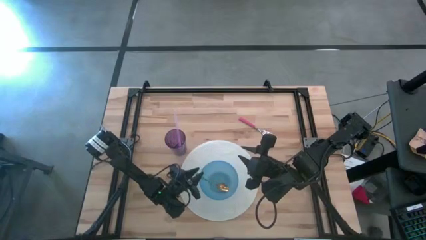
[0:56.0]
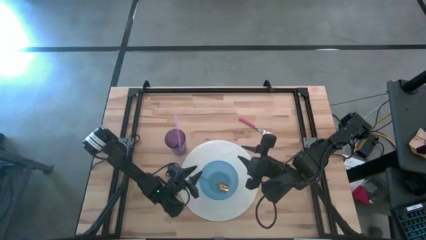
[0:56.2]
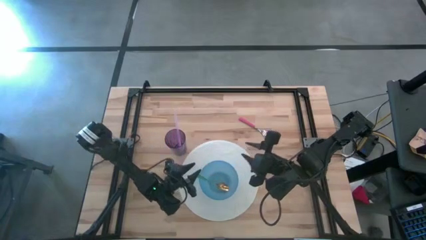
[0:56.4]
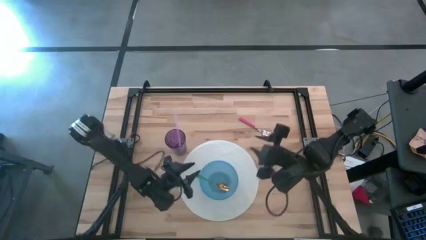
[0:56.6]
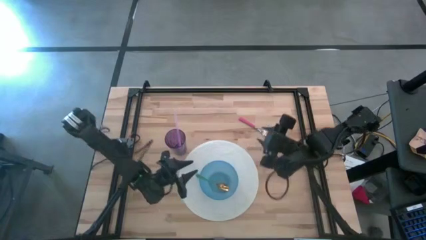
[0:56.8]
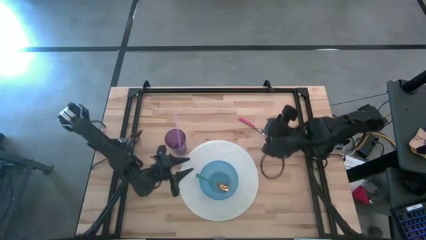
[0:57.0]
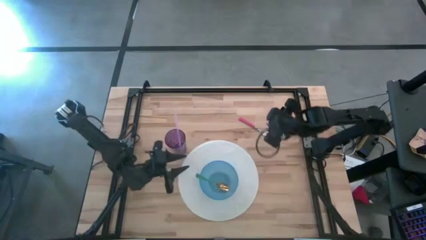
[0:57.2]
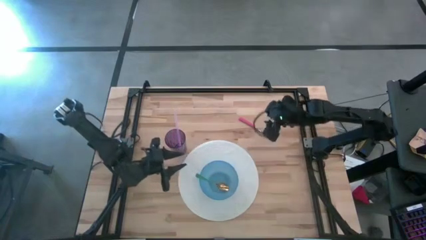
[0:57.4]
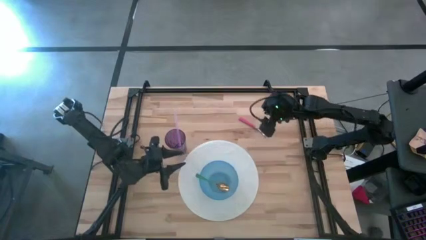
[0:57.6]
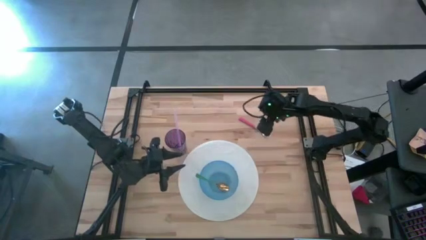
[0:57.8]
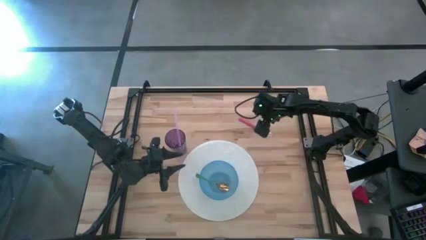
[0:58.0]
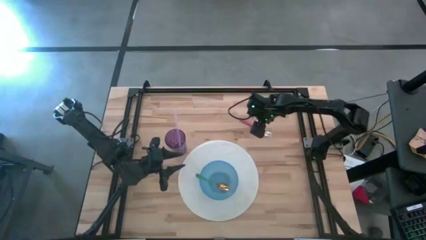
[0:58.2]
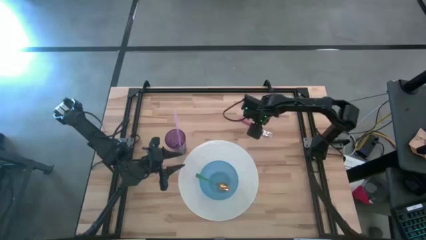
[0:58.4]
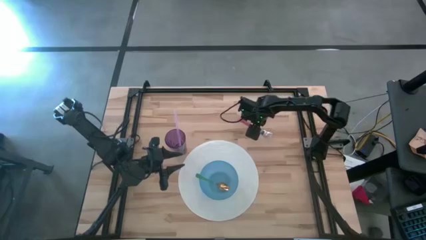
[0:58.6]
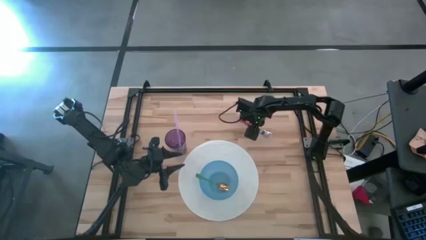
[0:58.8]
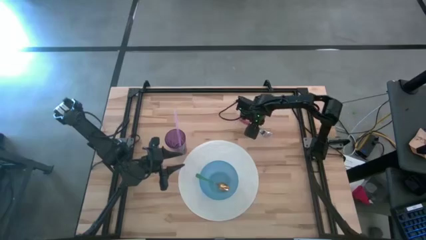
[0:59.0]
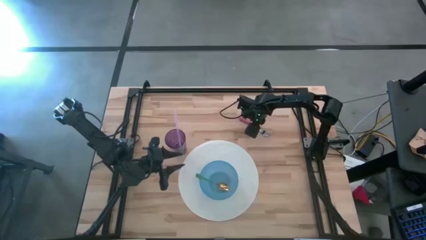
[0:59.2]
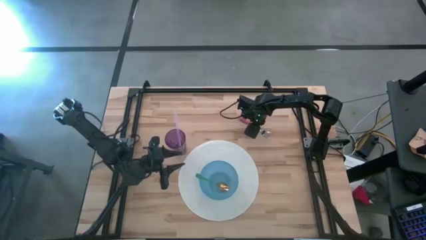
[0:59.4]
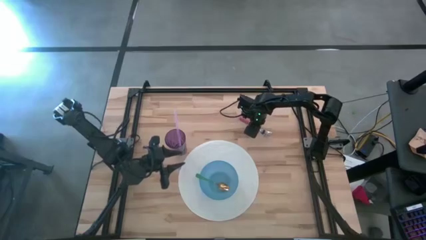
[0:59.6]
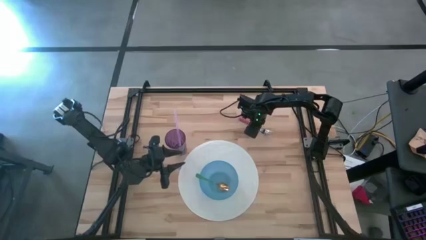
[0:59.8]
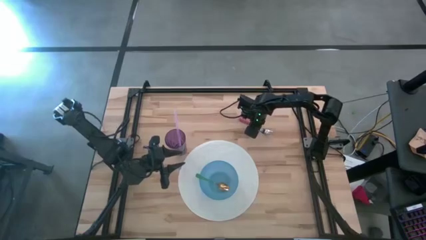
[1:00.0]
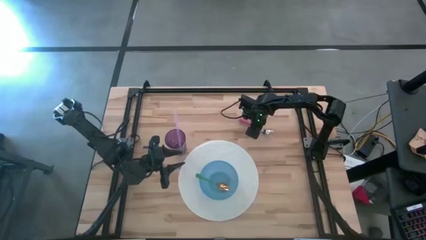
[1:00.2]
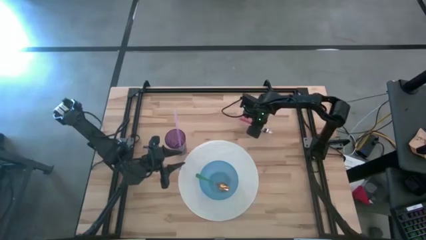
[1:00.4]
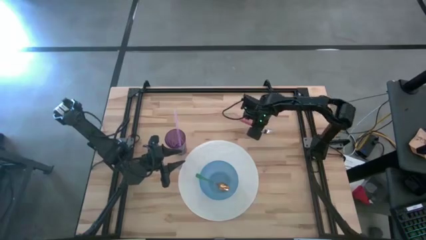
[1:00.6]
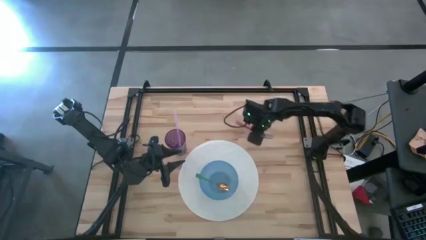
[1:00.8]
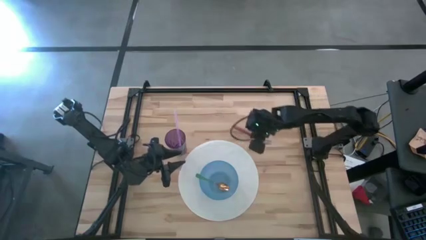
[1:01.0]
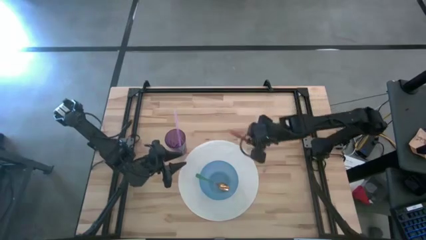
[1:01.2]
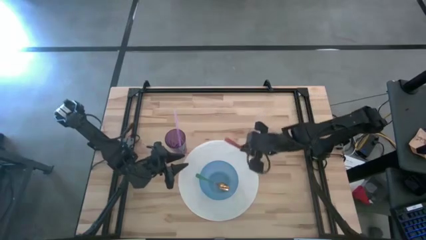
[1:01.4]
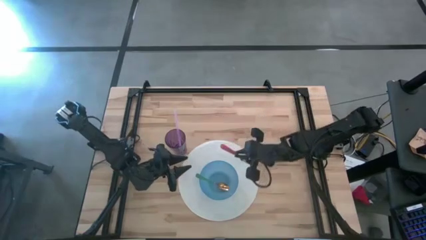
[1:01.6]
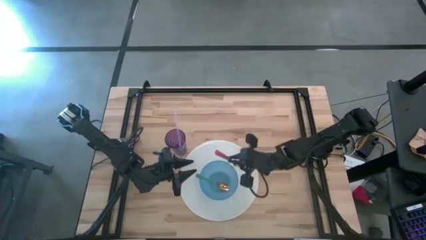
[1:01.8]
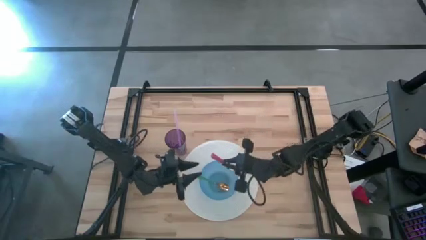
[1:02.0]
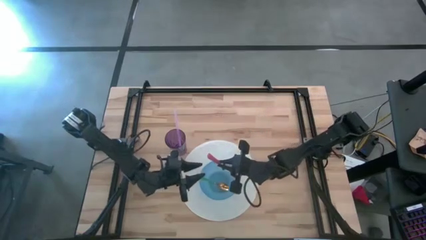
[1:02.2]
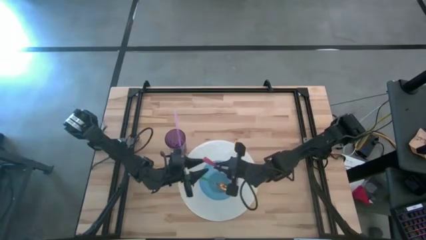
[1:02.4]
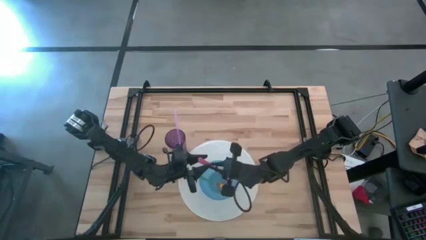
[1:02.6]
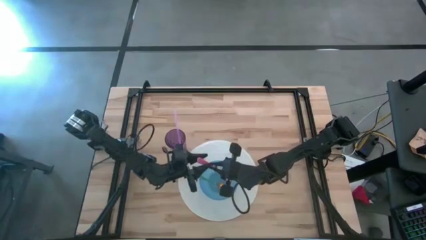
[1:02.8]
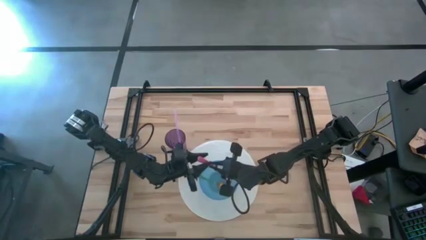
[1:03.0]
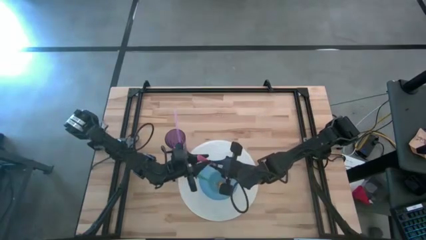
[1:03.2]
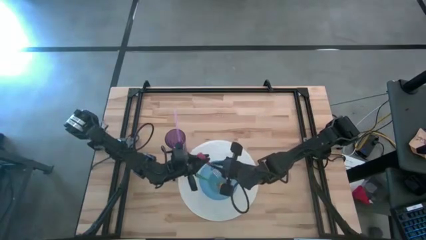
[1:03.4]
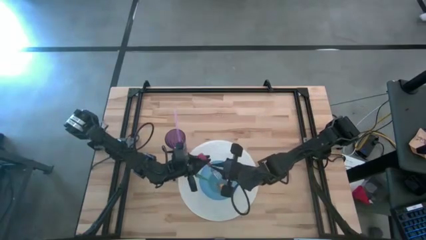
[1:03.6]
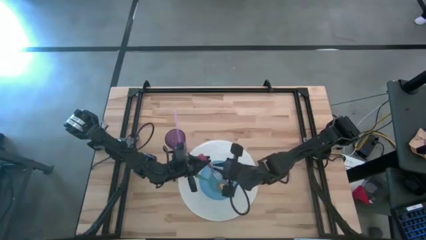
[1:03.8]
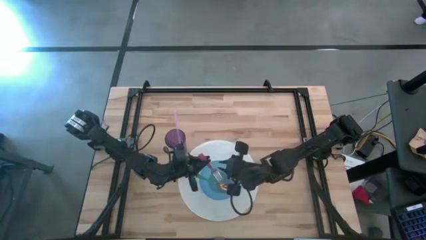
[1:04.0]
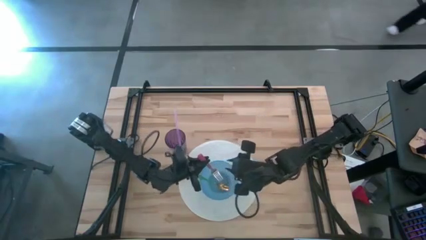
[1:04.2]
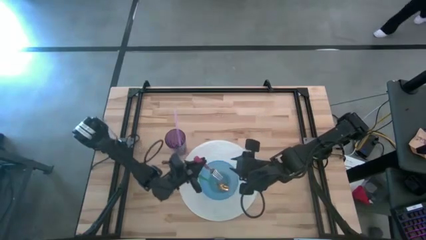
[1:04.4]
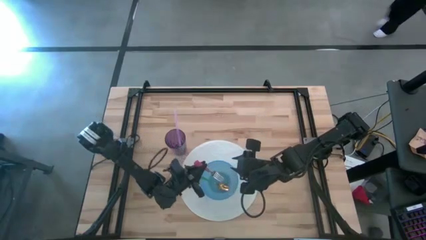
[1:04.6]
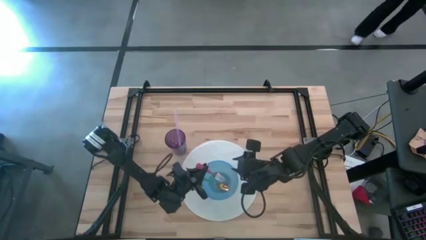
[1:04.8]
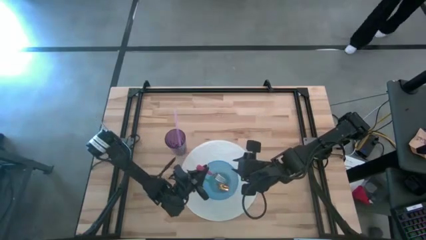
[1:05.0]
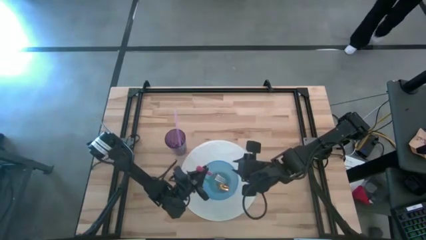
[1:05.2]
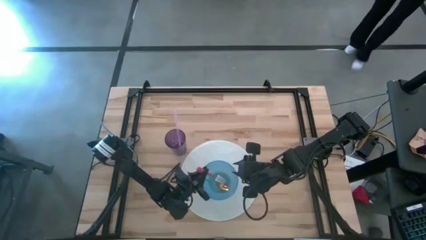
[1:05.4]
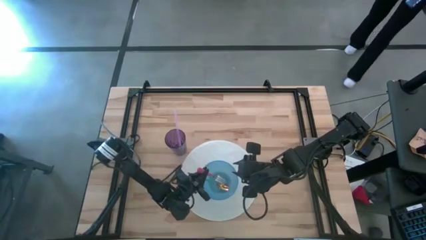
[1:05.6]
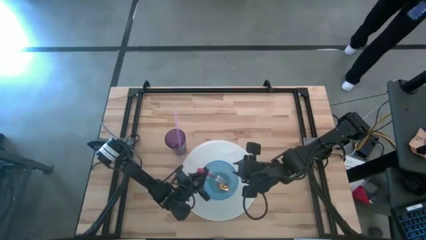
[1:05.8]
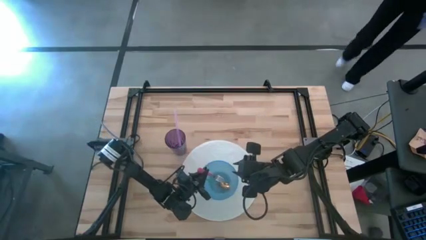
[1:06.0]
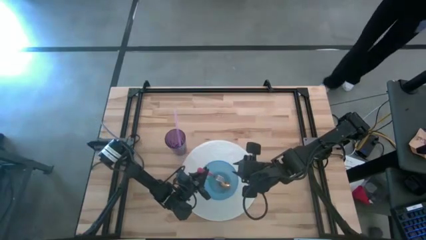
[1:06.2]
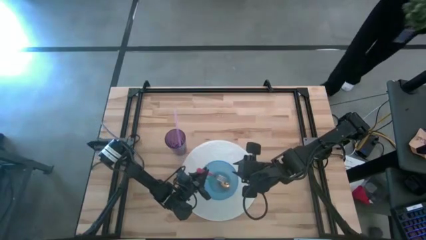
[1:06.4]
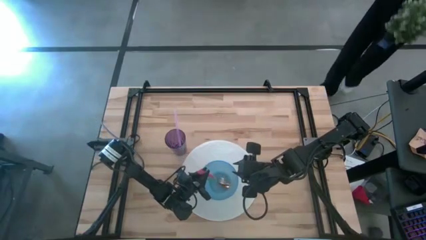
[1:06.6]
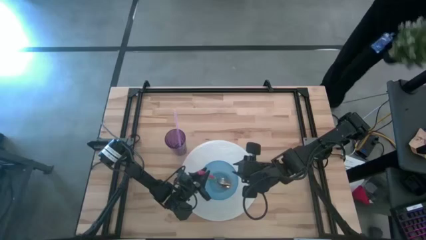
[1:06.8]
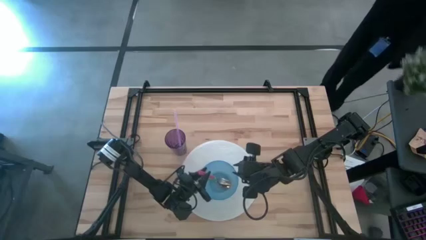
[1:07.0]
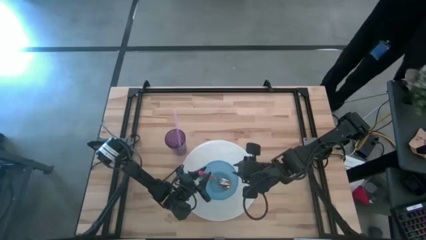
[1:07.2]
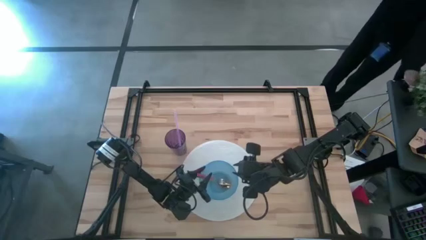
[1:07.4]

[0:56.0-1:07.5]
Task: Pick & Place Utensil
Put the fork into the bowl

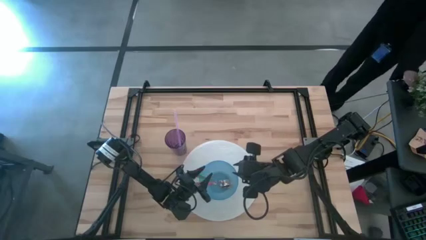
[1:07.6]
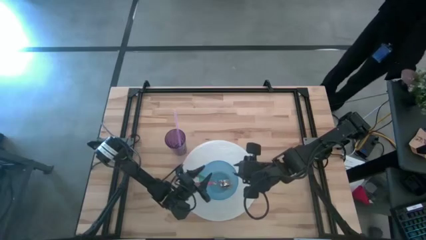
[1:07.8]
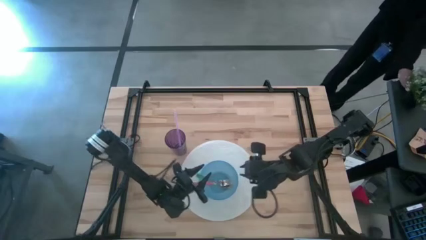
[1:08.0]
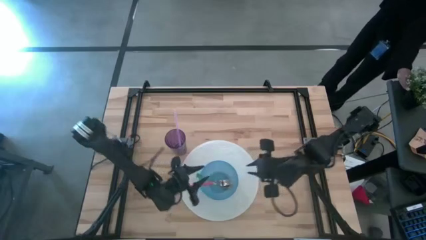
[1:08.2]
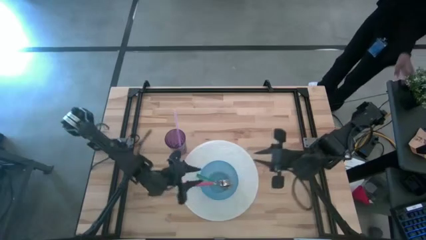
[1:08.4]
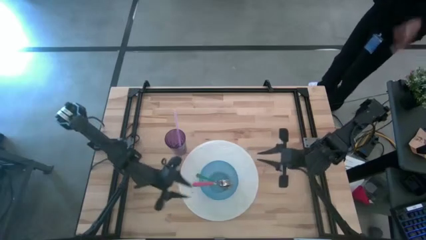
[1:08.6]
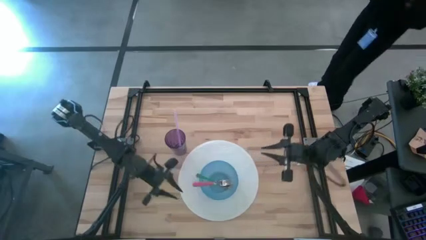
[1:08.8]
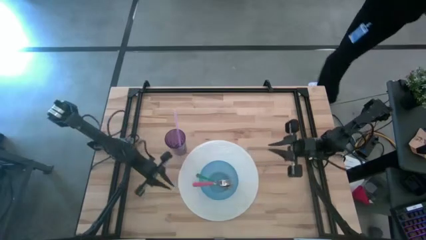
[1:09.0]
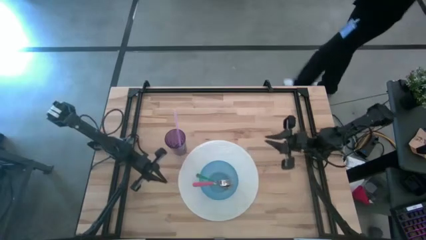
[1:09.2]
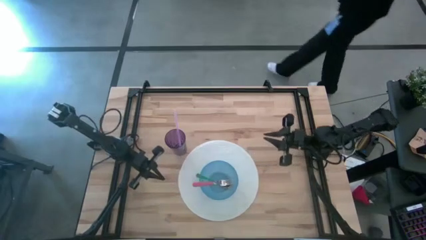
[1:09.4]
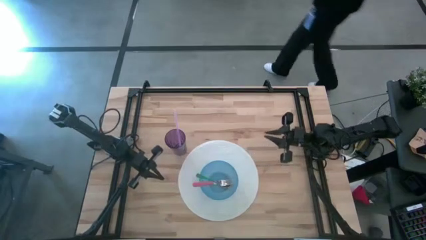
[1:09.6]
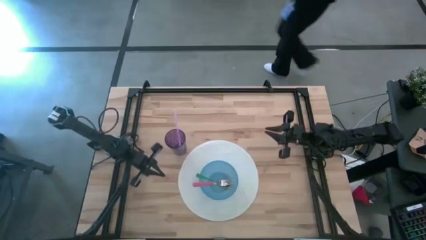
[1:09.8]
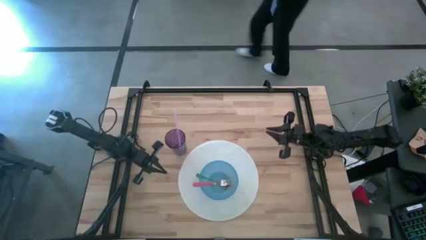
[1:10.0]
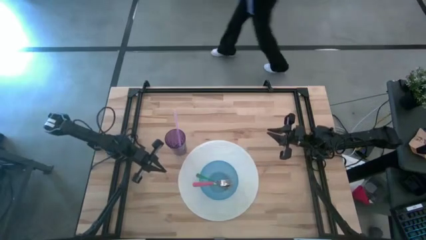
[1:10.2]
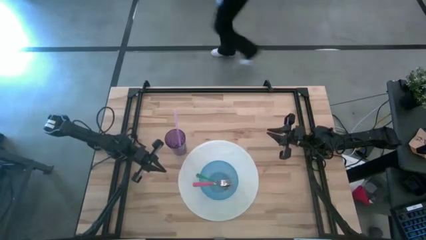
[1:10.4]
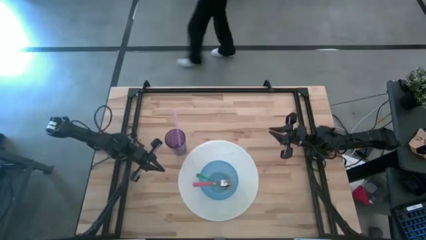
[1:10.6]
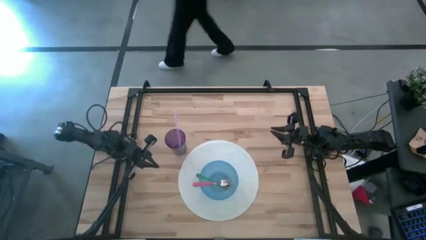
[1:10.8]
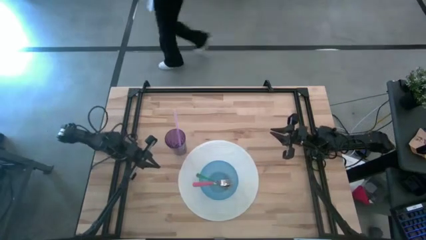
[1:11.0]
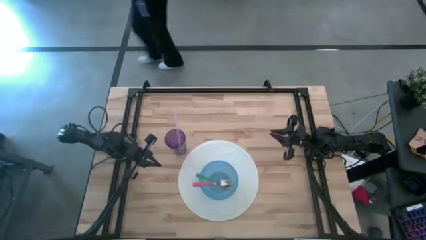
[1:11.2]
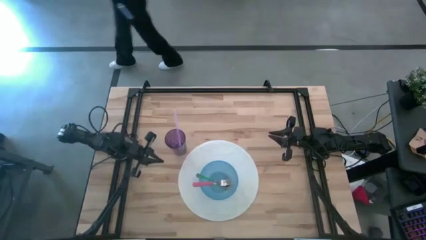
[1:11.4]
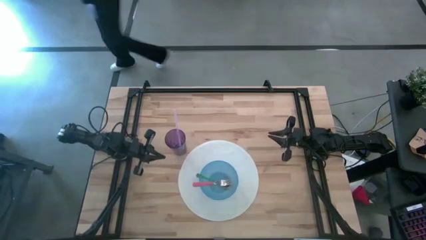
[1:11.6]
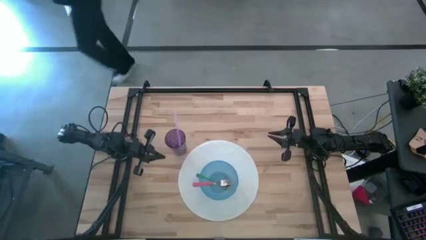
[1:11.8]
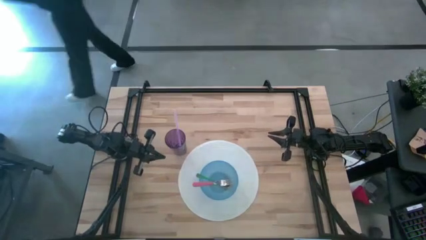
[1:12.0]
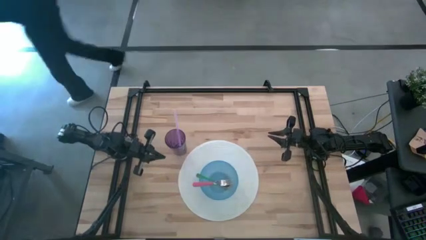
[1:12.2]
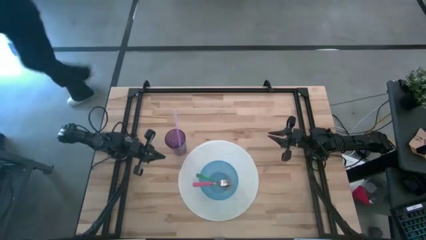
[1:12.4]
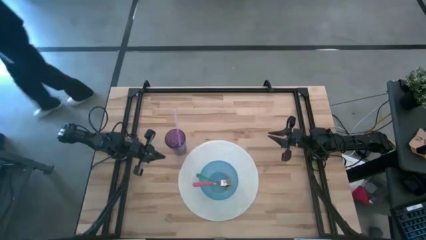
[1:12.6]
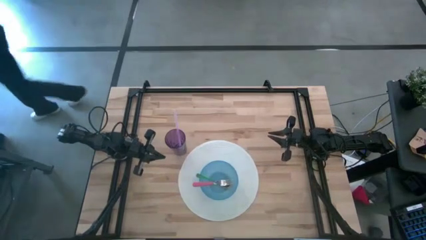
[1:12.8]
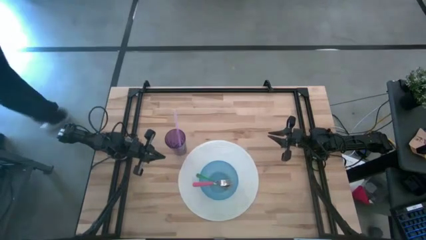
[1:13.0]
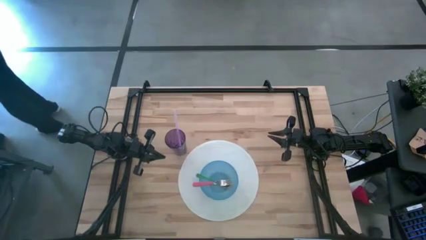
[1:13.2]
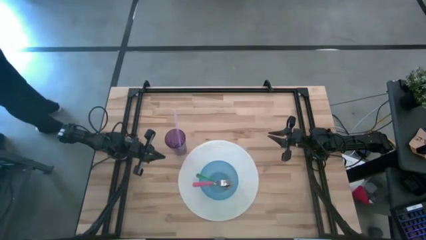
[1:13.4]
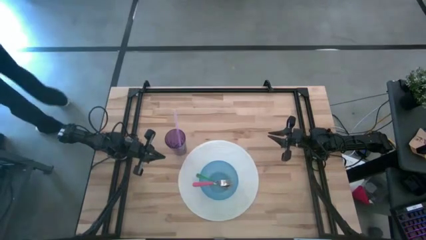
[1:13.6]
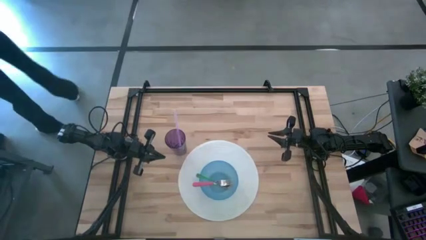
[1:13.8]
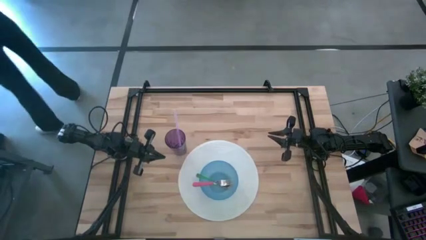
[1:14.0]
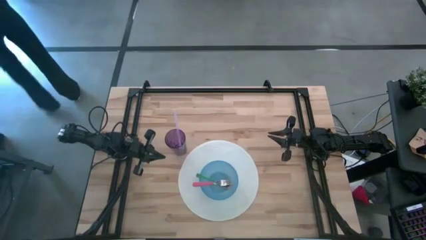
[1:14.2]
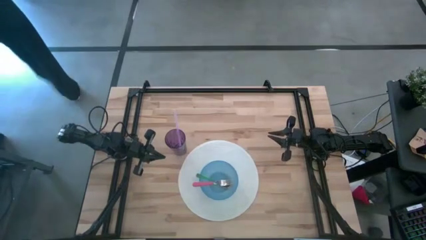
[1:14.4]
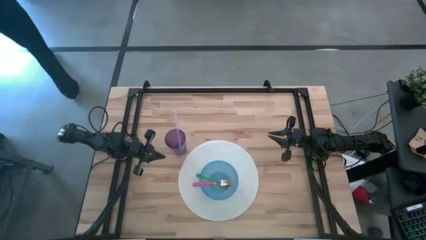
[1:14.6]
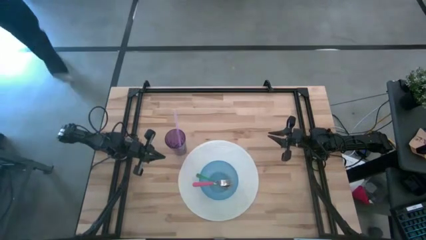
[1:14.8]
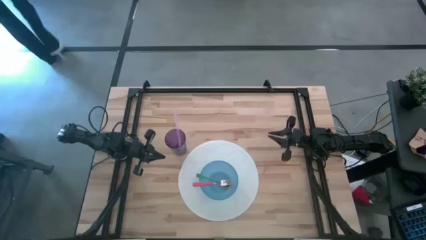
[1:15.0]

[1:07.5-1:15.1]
Return to Home Position
